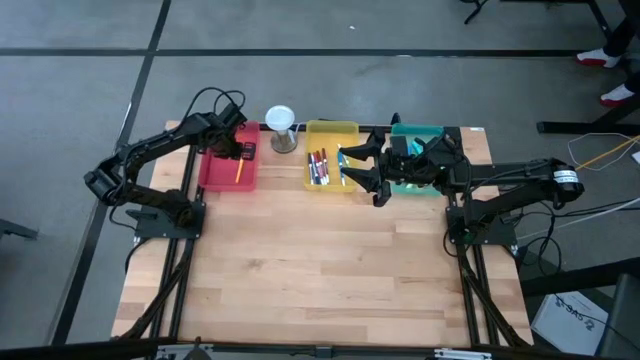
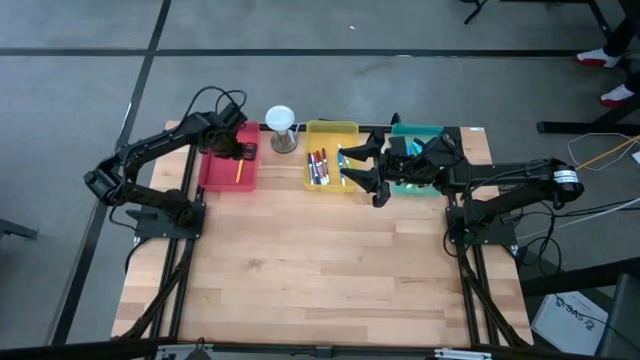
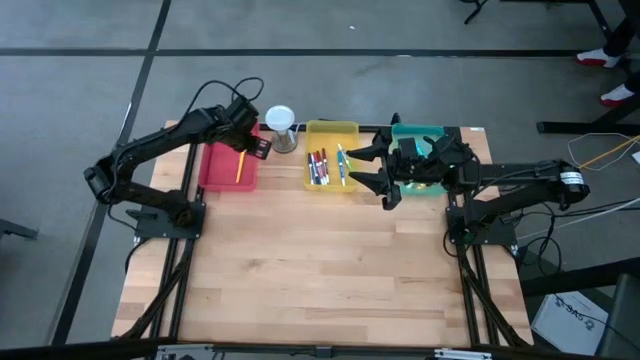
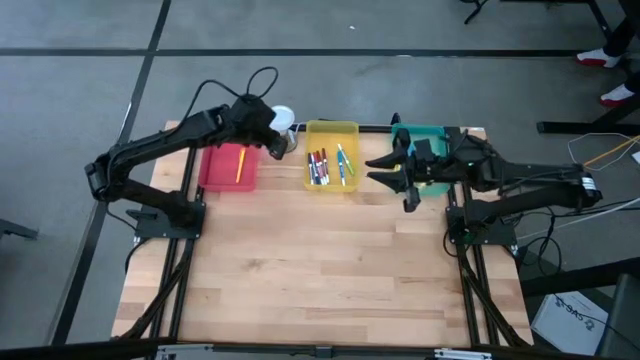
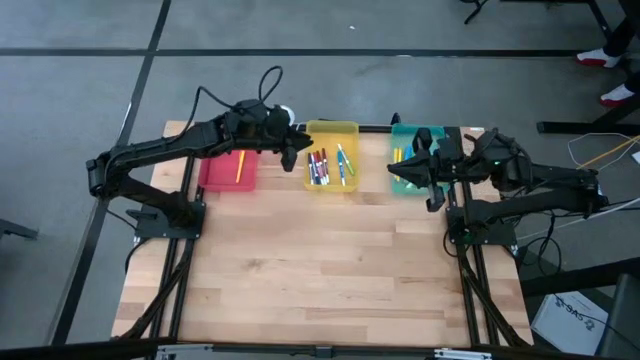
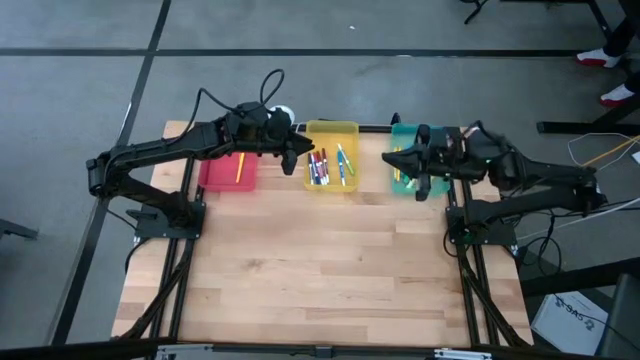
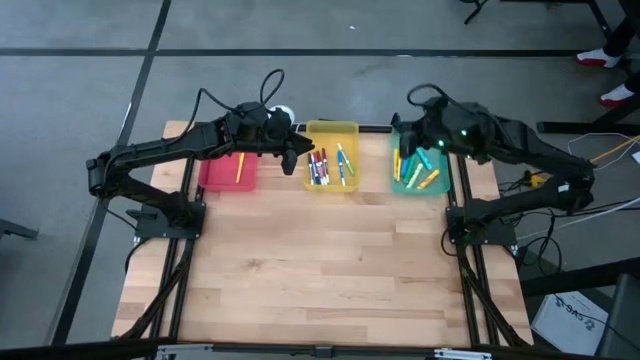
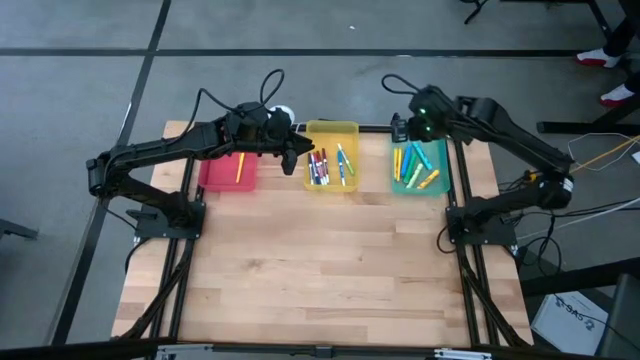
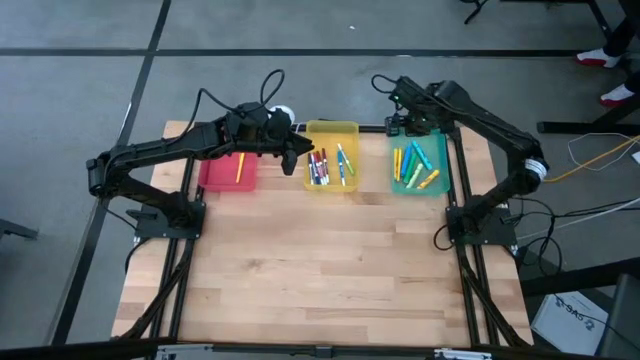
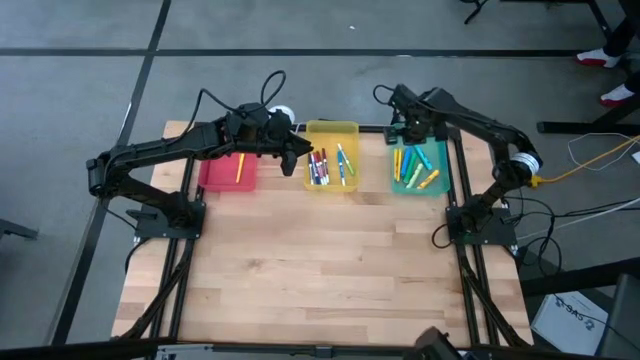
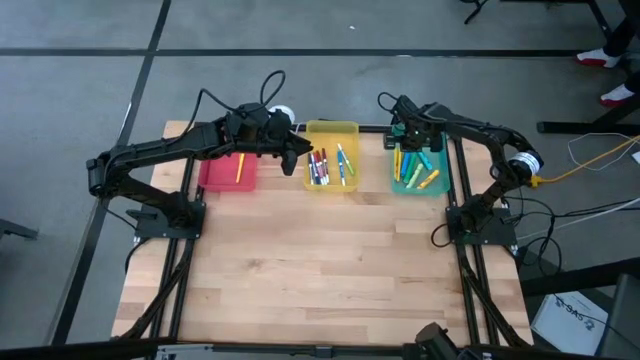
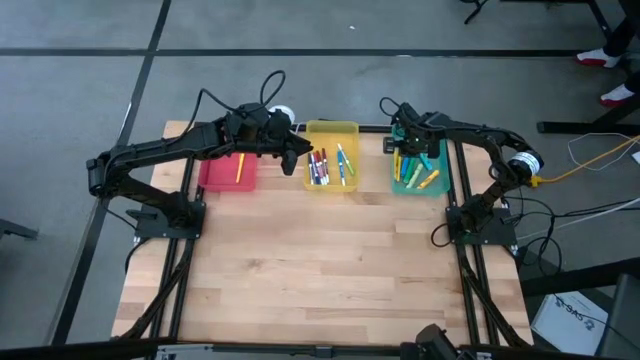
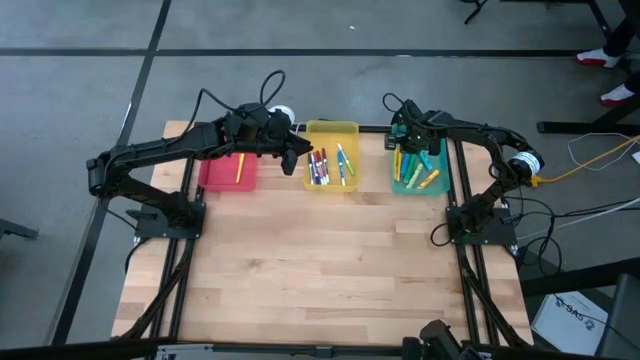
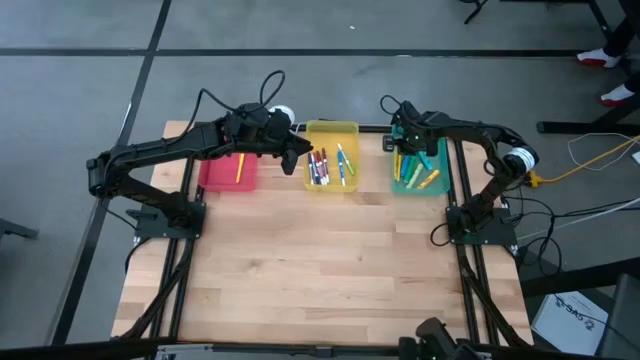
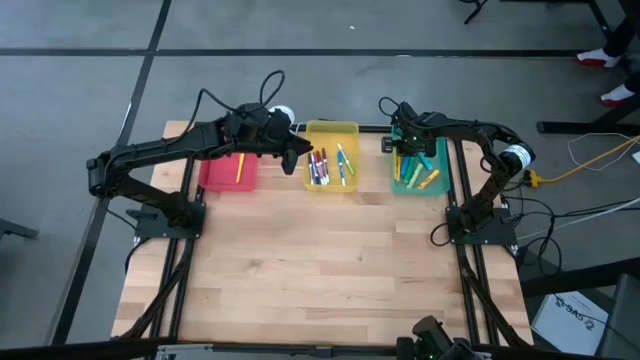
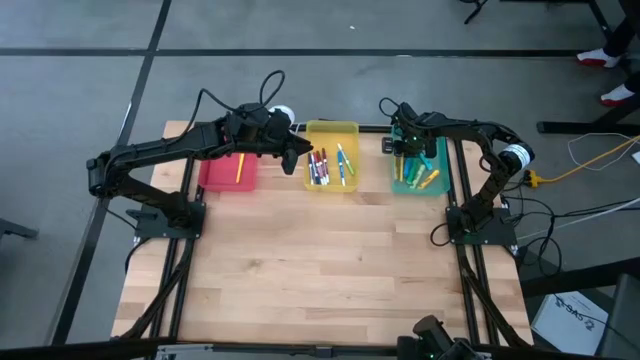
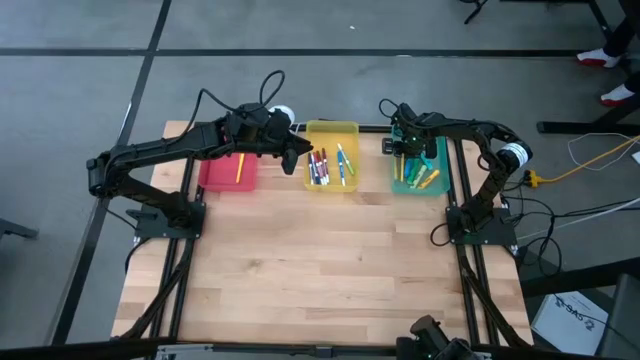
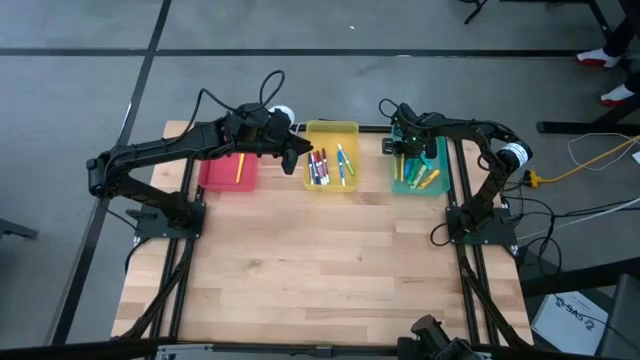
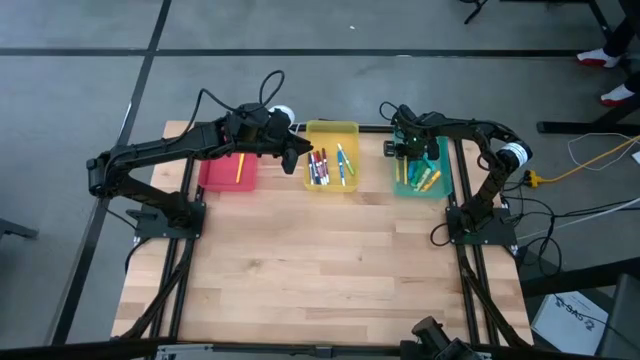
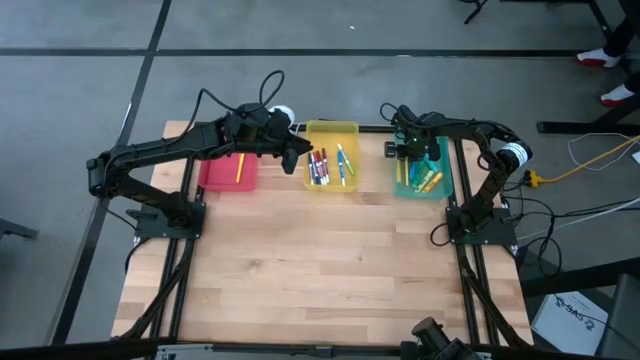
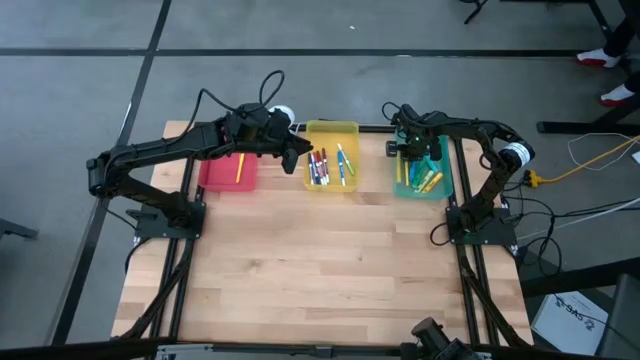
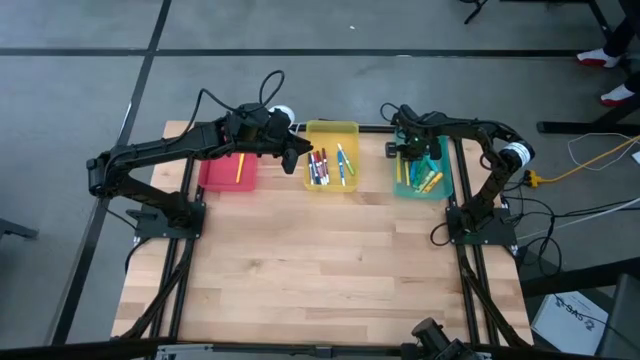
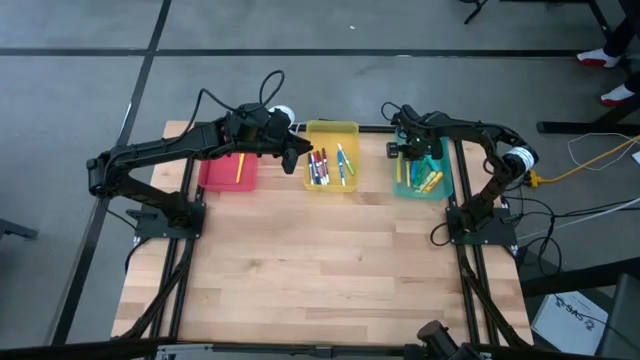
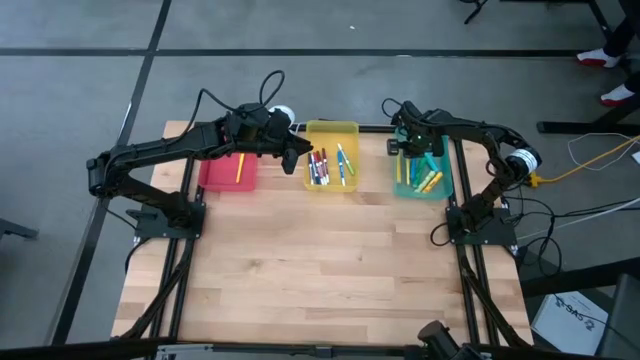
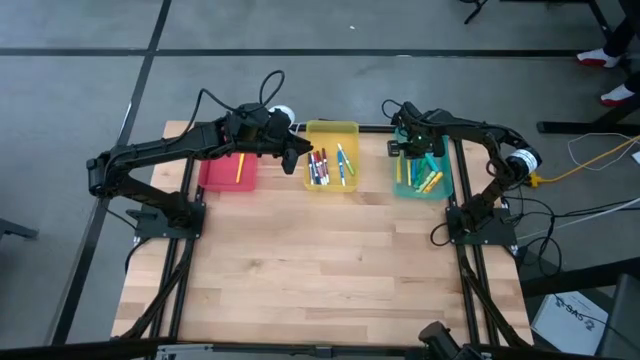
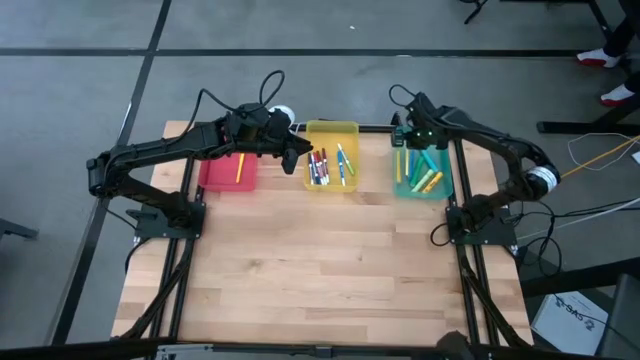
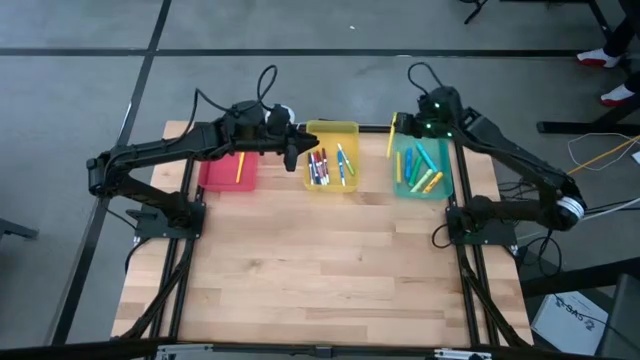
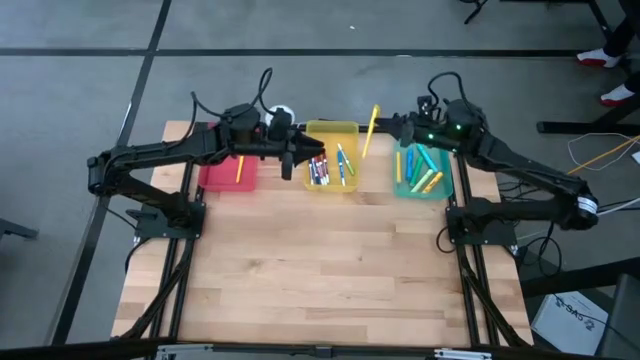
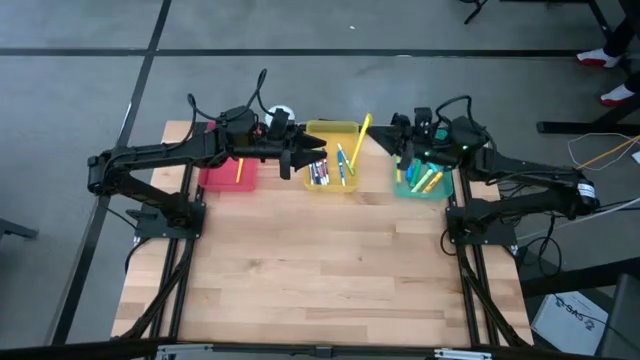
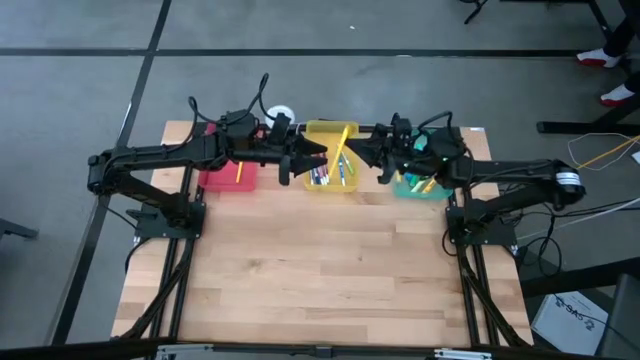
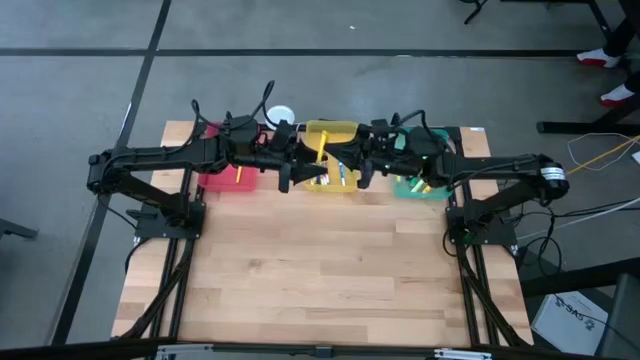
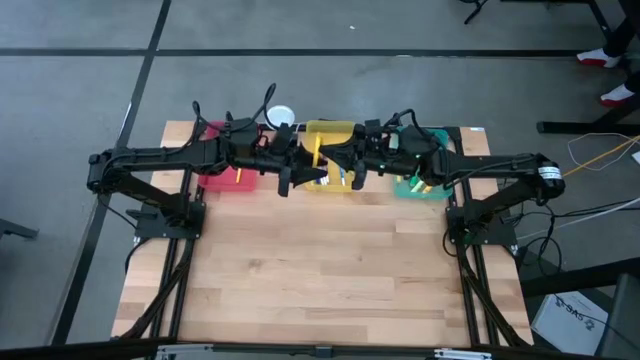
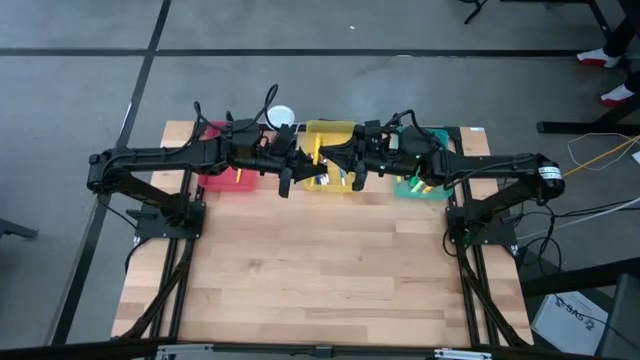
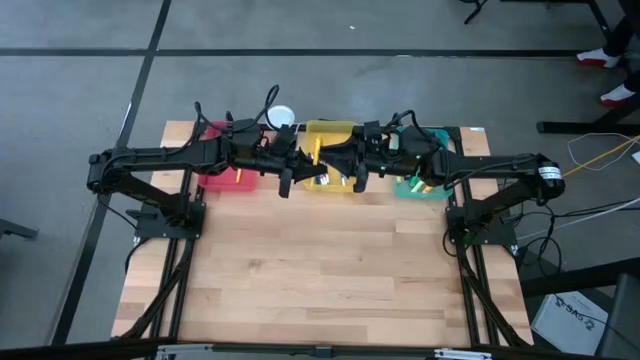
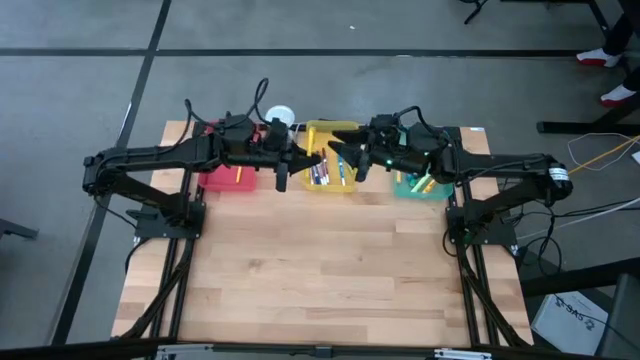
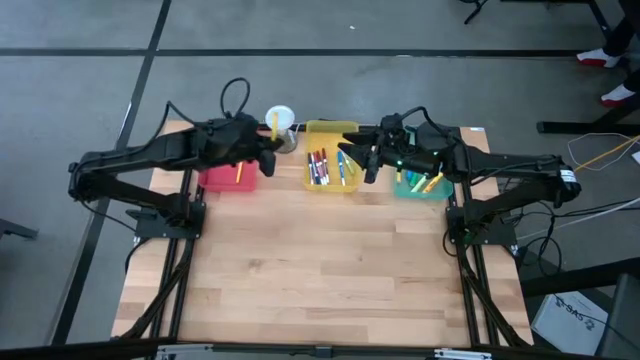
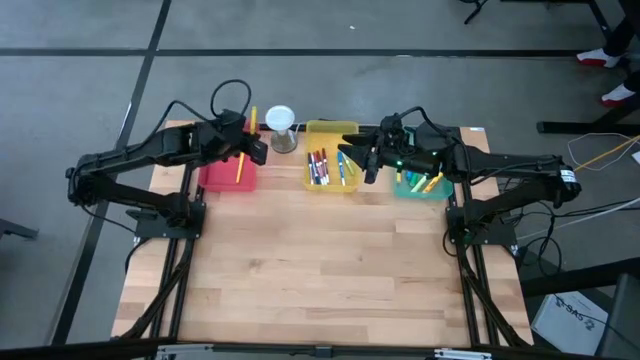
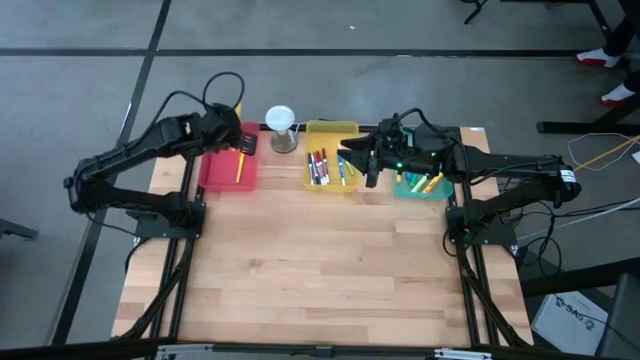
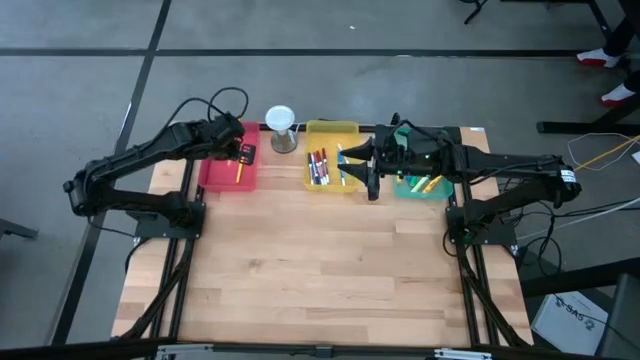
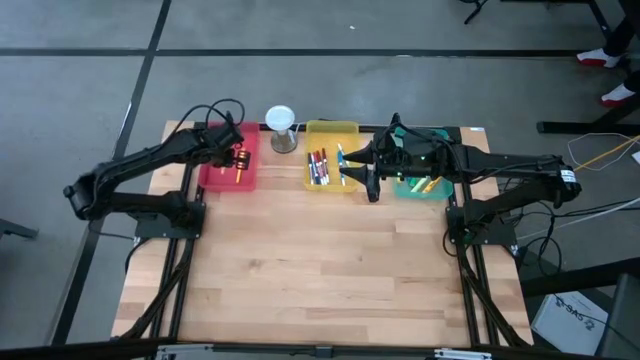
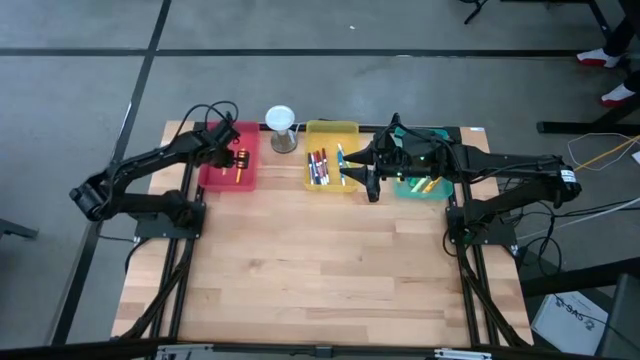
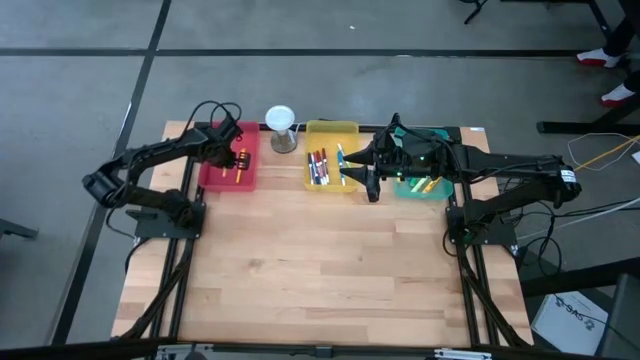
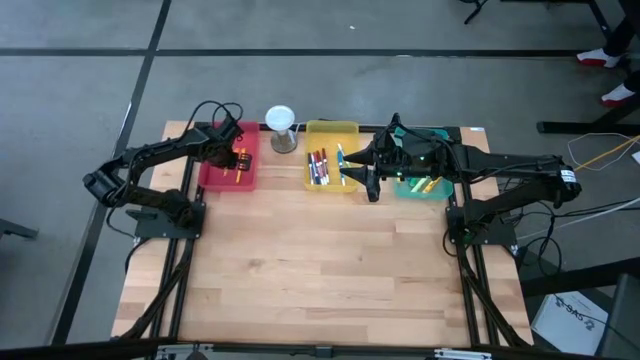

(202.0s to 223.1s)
Task: Pick & Place Markers
Put the yellow pen from the blue bin into the red bin
